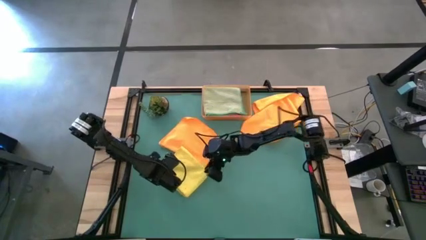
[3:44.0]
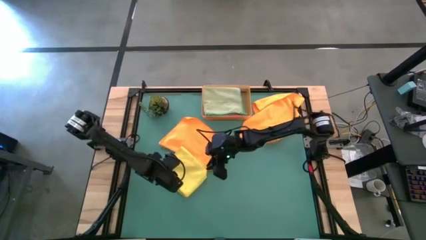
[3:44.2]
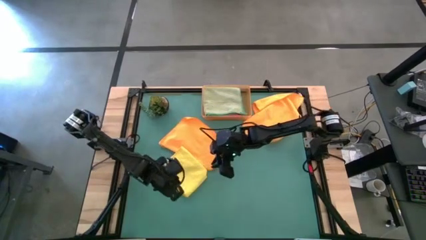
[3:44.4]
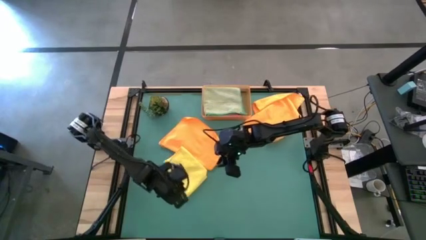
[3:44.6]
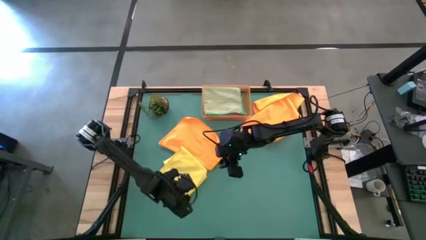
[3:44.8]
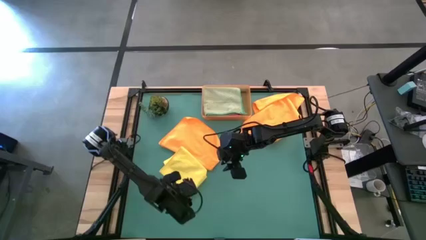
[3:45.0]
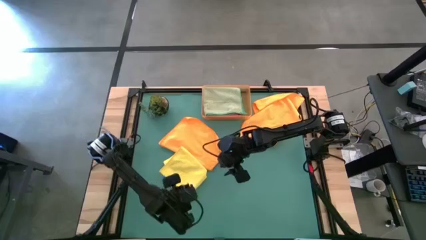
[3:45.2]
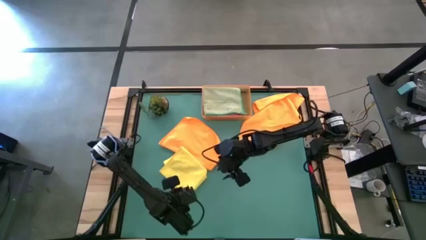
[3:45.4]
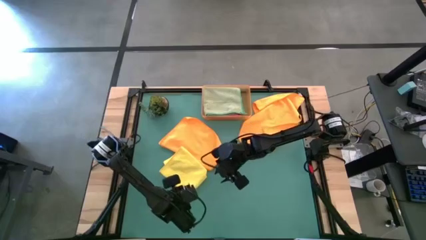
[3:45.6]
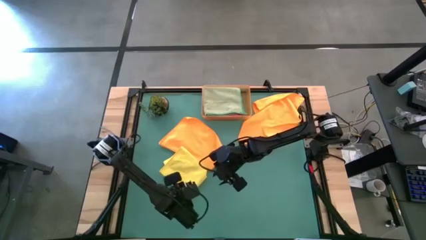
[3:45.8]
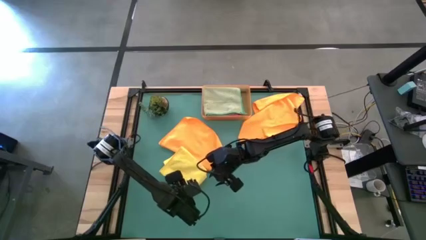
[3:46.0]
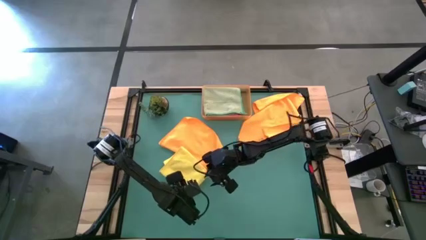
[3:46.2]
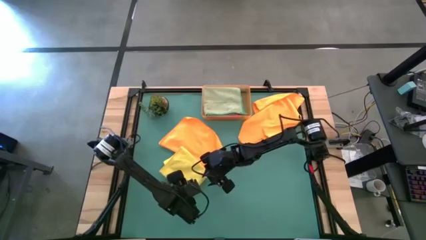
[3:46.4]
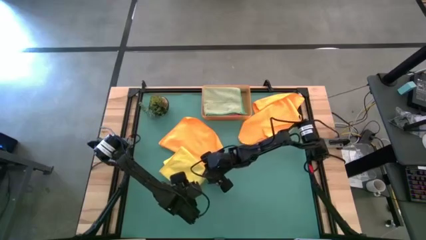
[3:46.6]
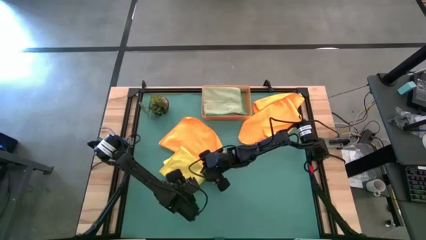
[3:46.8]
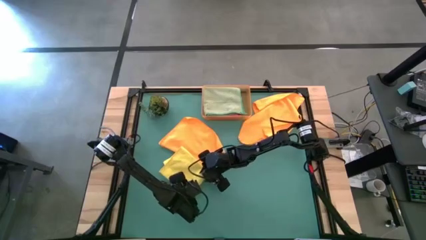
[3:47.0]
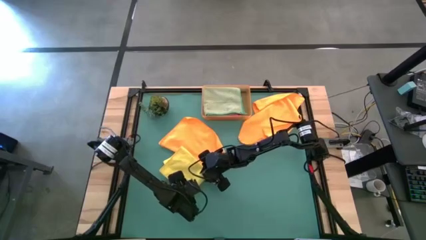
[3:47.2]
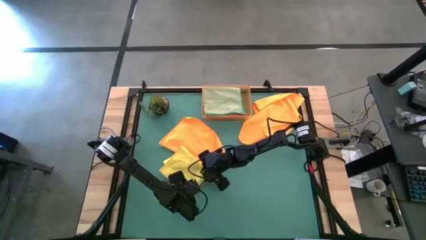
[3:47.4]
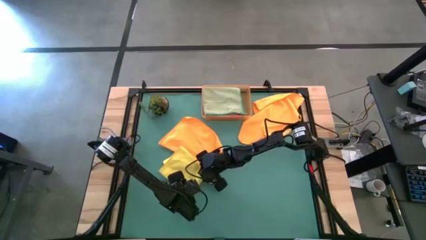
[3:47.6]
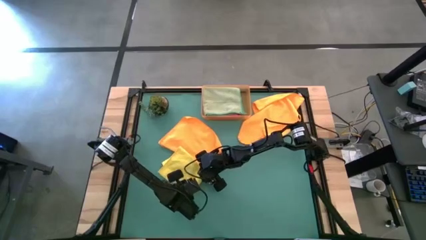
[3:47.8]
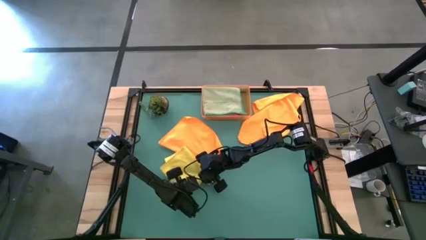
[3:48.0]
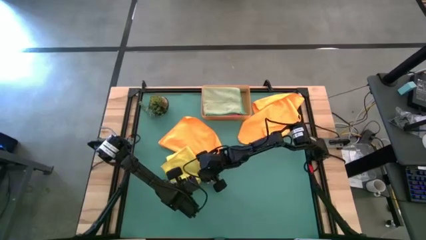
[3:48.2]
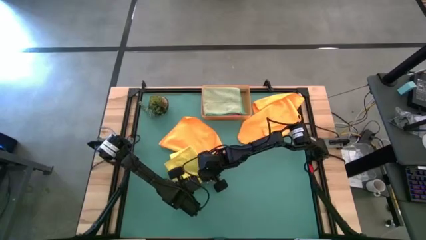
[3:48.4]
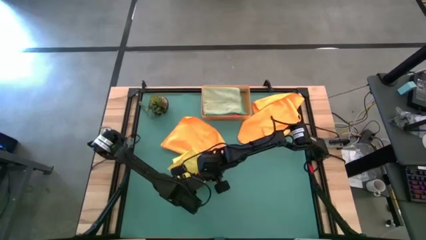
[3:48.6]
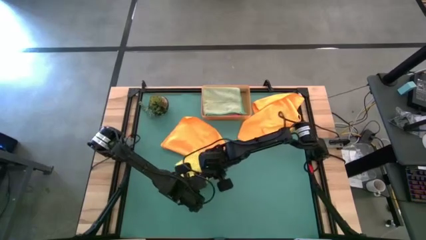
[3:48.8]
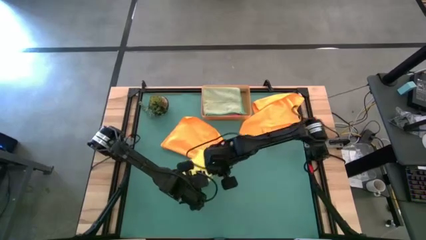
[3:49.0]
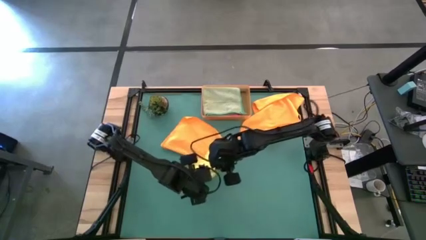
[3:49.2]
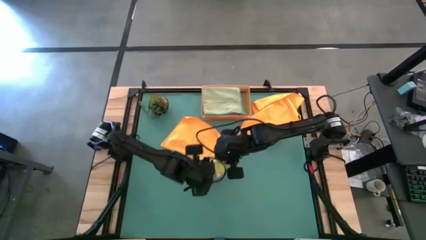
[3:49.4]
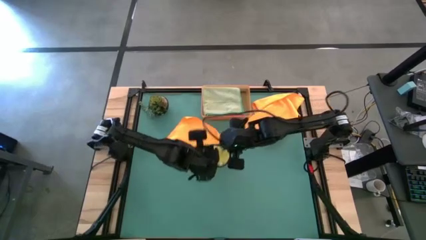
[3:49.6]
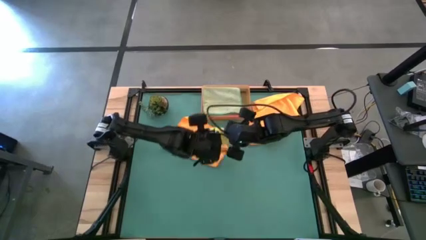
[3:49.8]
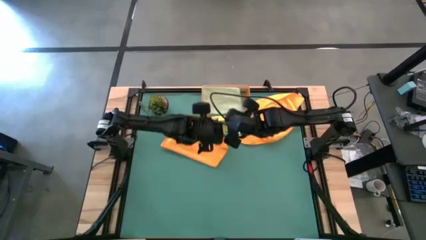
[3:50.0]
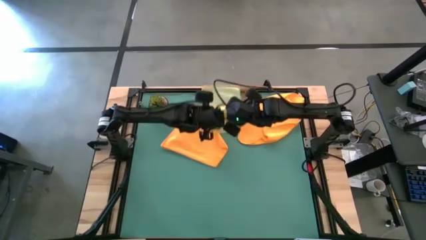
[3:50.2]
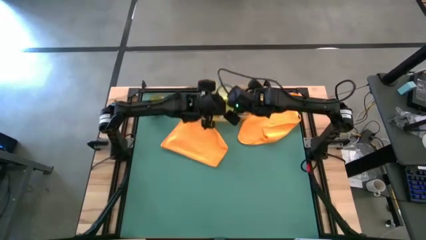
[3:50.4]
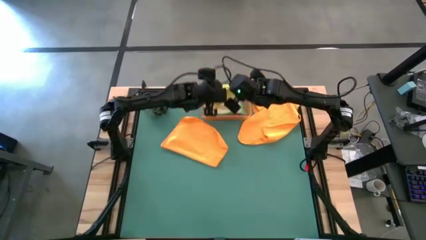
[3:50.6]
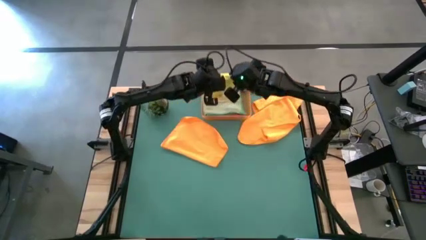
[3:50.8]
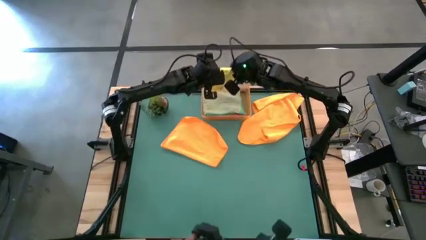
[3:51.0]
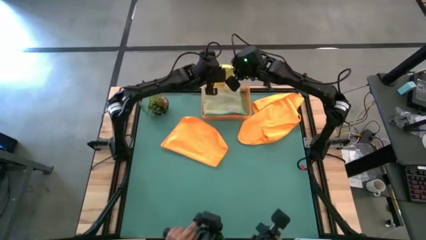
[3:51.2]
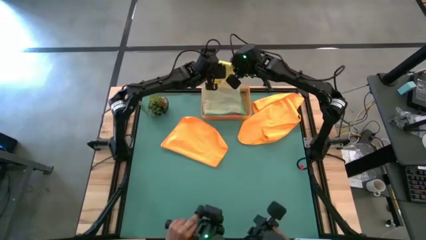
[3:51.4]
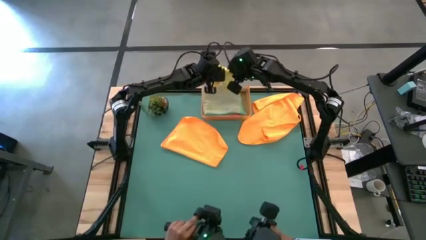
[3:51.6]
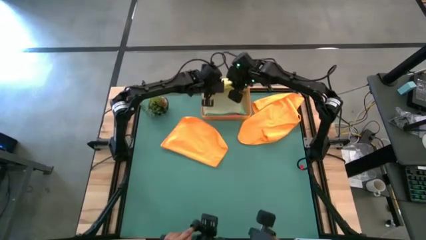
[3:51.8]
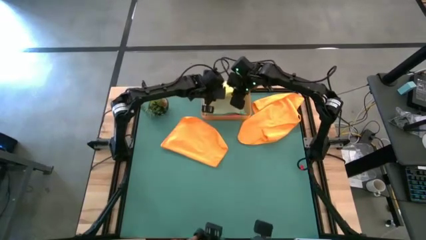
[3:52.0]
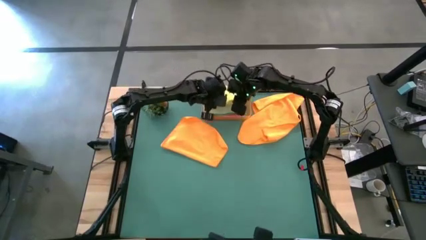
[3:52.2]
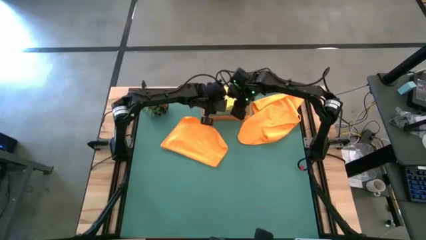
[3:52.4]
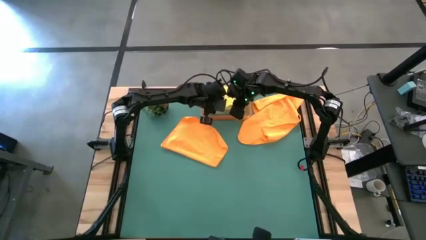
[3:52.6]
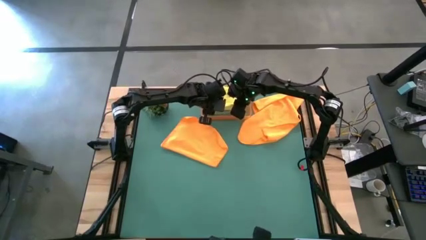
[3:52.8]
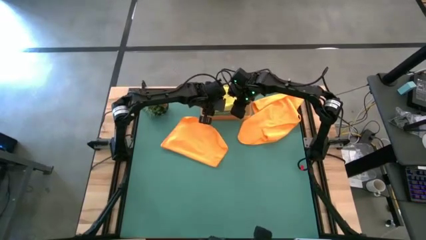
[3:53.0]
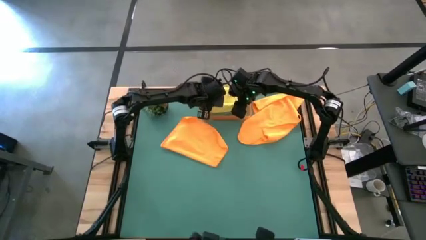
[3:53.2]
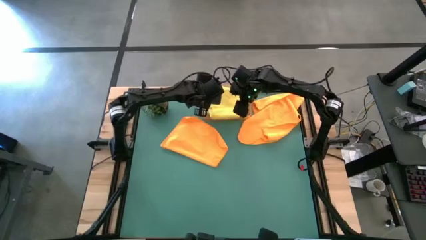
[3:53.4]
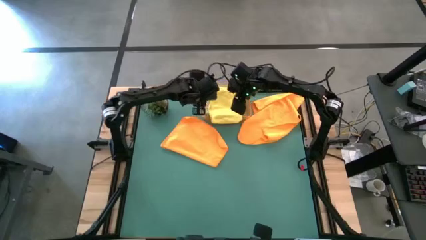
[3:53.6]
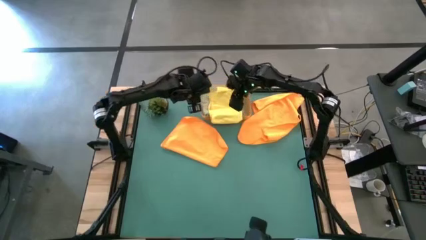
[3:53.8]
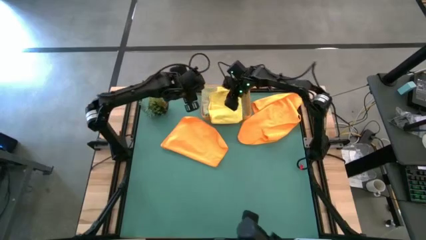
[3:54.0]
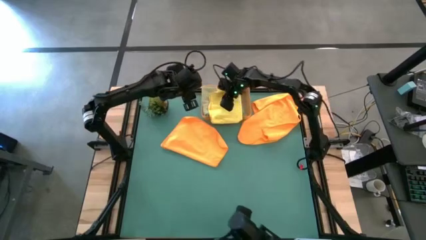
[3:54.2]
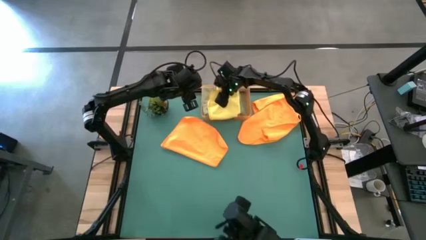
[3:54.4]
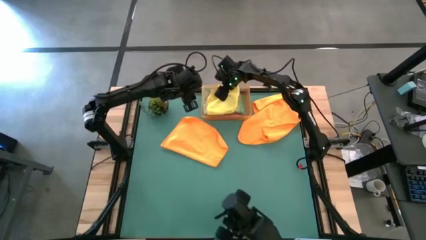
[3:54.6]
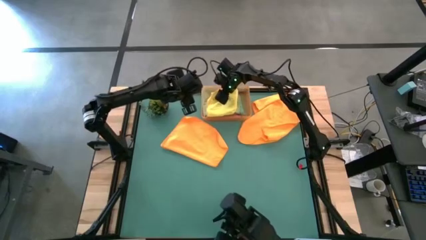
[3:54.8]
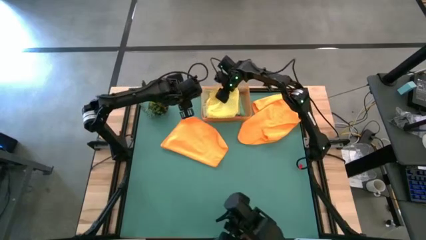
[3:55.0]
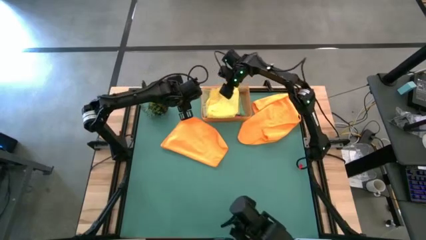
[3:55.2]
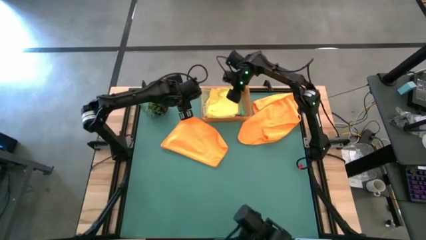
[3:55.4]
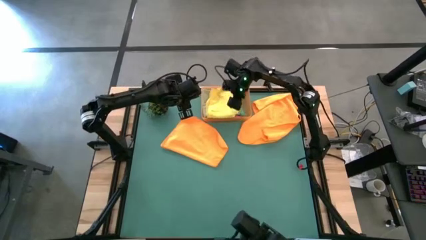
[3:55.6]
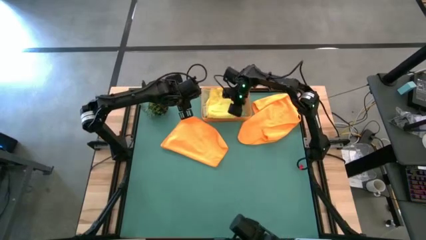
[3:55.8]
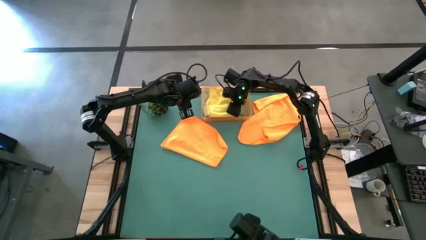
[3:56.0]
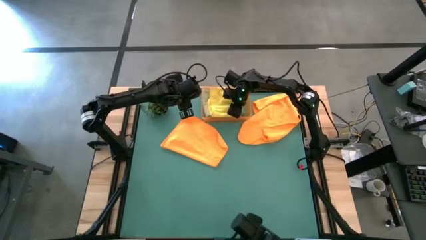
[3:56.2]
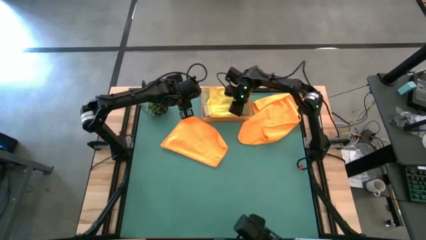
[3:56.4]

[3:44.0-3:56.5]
Task: Fold microfiber towels
Stack the yellow microfiber towel on top of the green microfiber towel in the orange bin

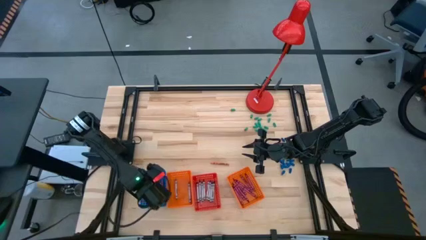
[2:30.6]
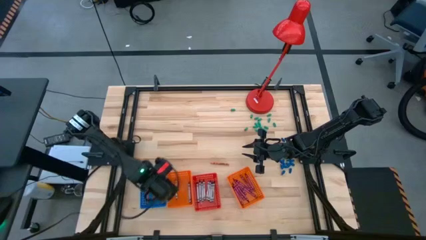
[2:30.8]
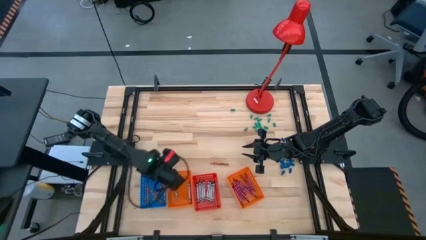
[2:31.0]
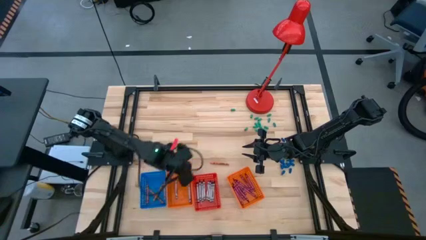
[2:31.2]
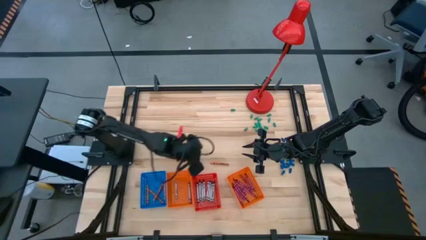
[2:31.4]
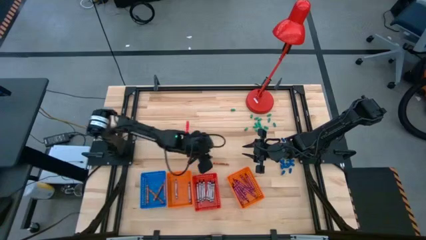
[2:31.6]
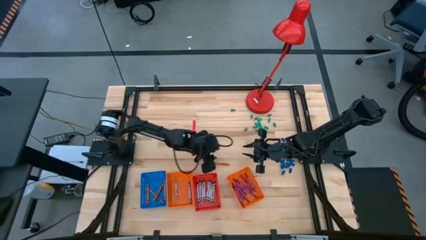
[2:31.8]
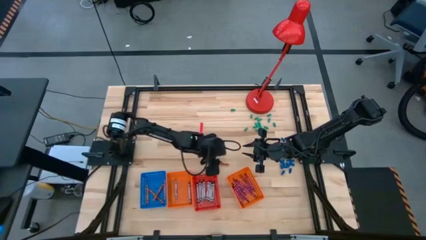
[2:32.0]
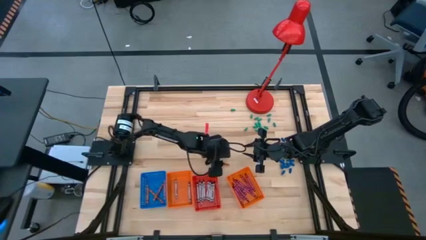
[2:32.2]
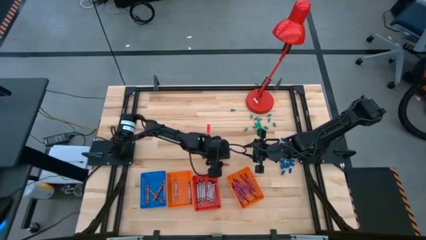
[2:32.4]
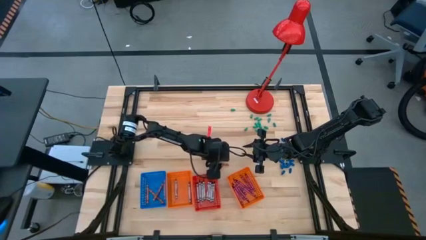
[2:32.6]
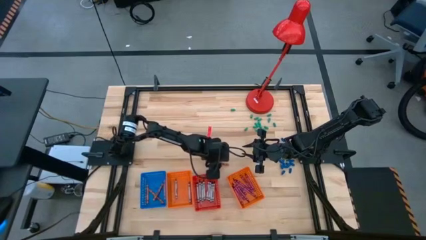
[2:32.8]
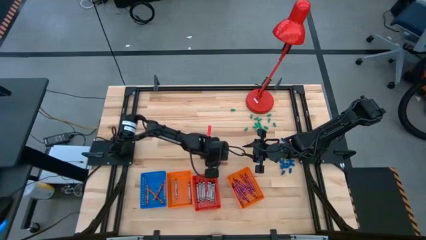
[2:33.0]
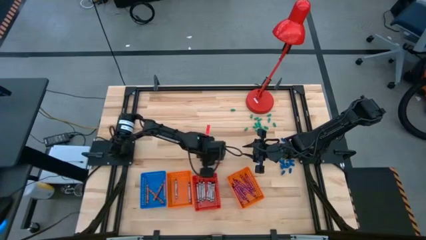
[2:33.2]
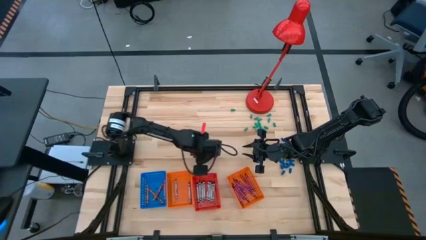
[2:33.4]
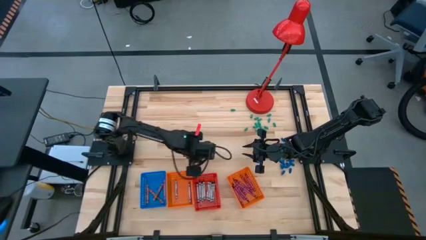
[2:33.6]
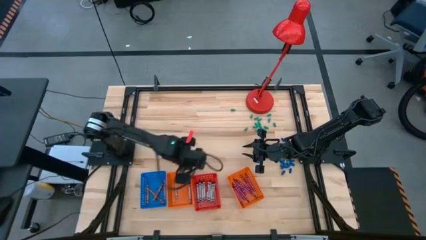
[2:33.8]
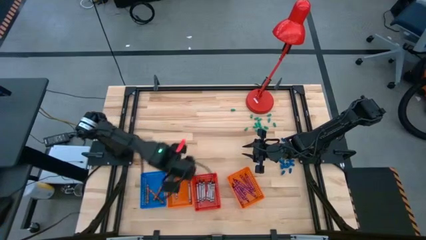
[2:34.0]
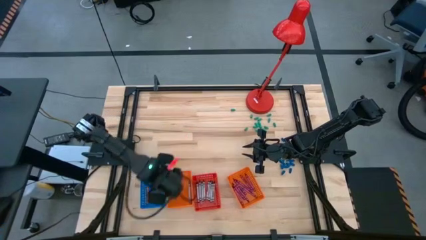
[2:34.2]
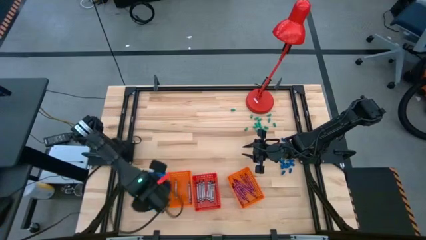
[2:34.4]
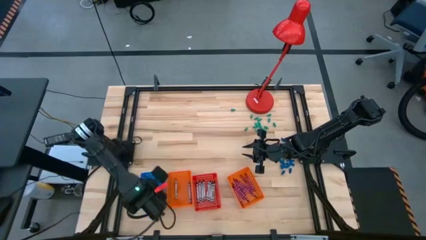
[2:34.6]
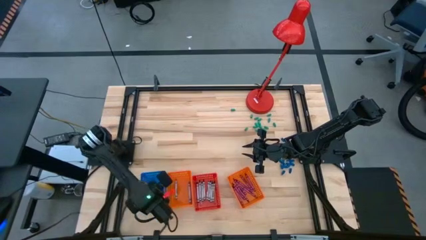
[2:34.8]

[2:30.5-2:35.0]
Task: Sort crayons
Put the orange crayon into the blue bin
